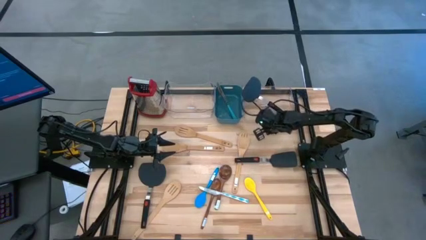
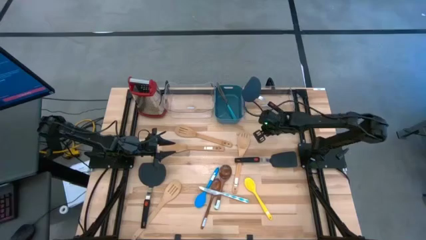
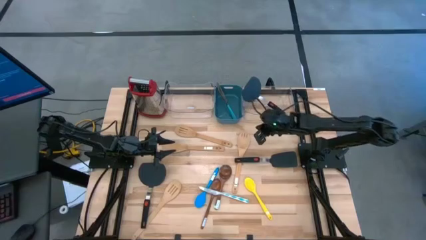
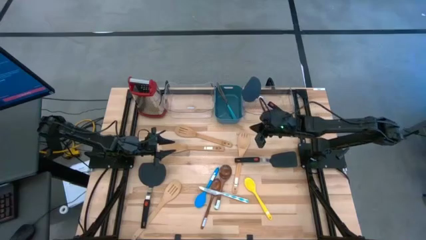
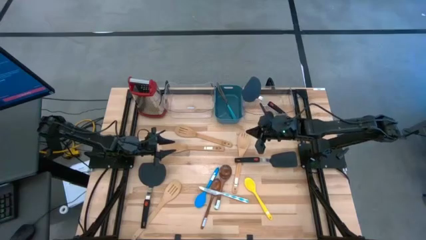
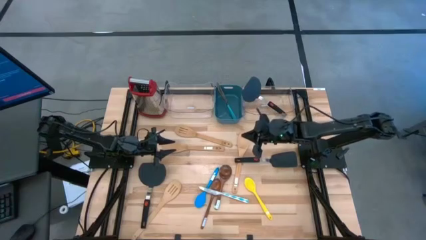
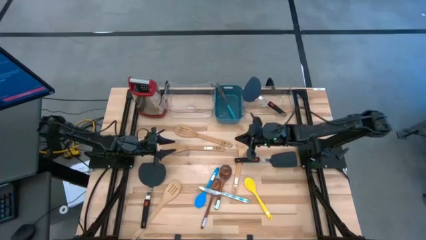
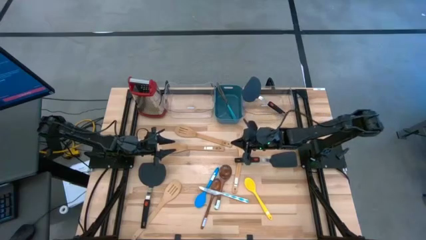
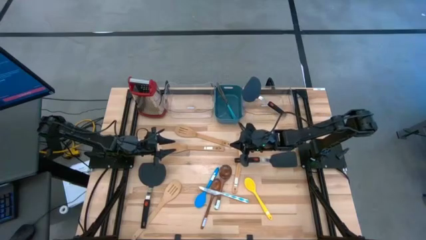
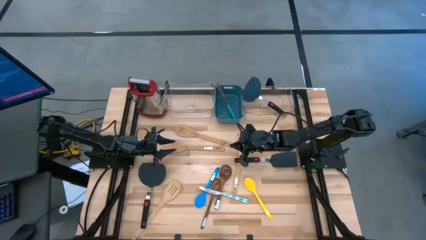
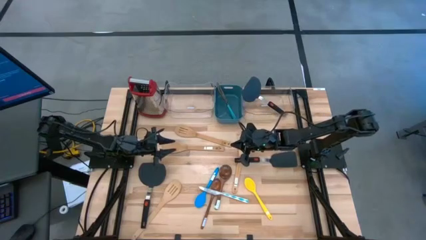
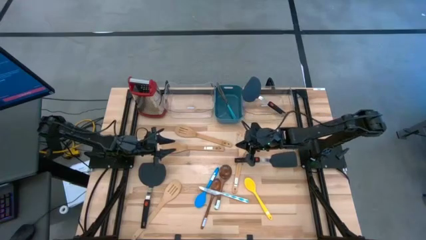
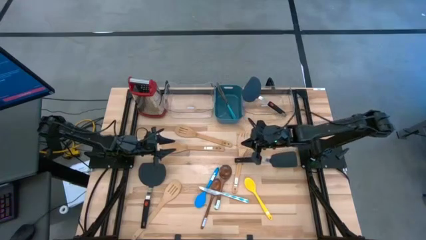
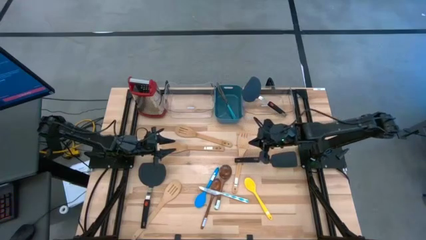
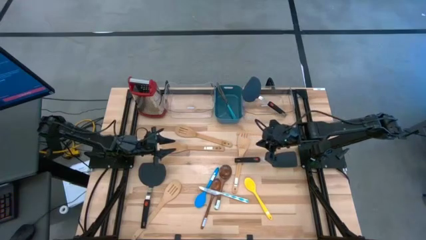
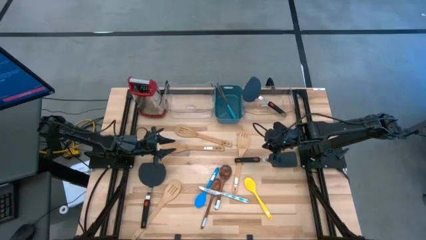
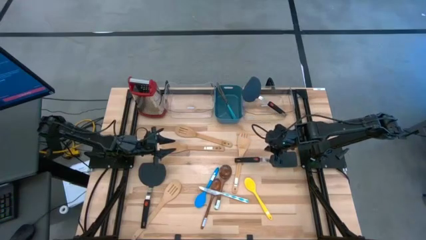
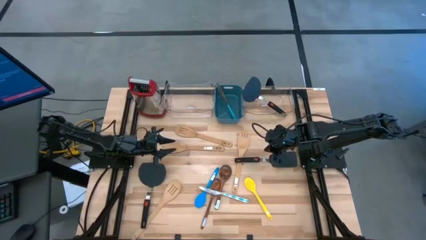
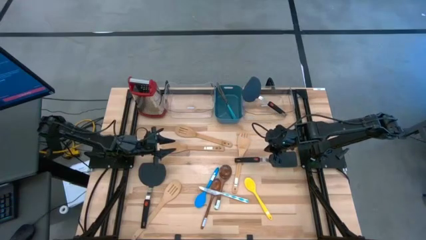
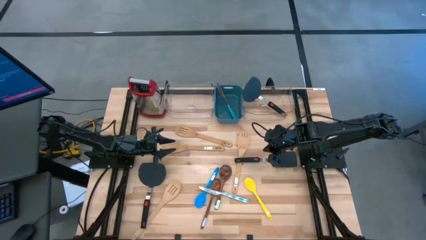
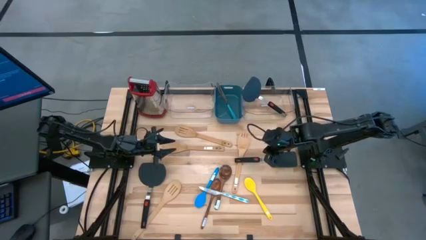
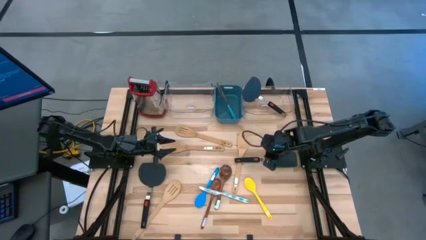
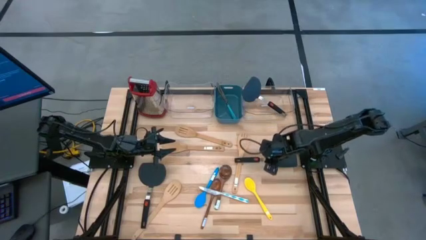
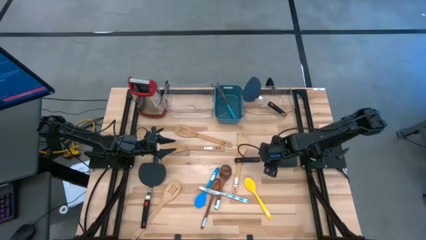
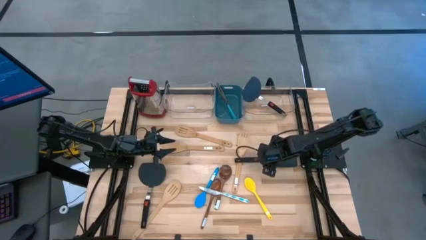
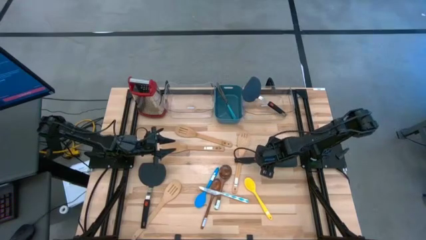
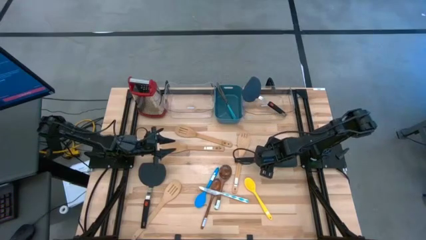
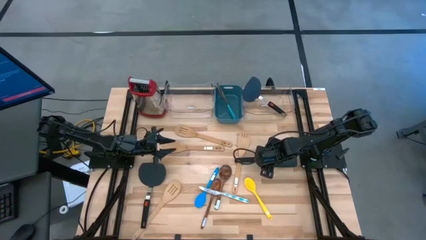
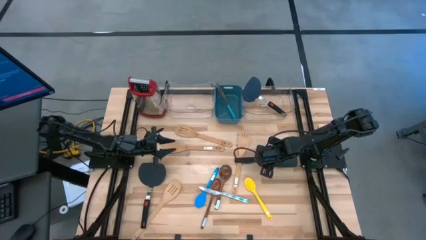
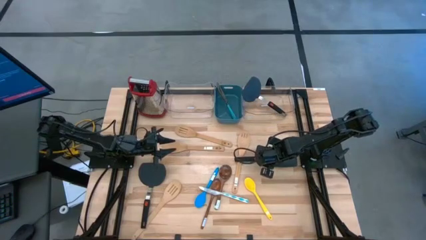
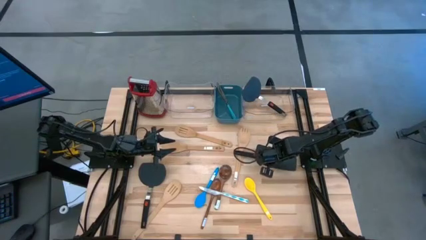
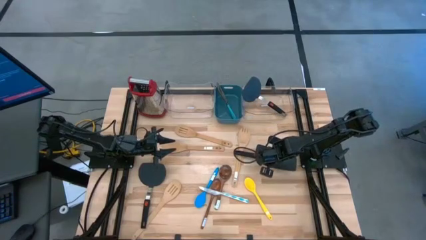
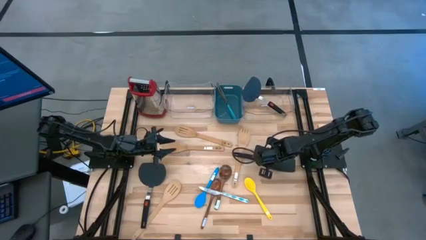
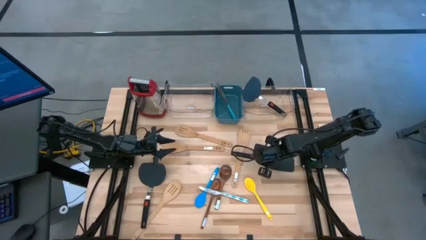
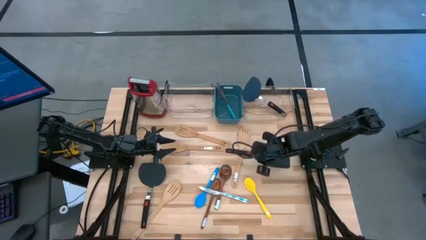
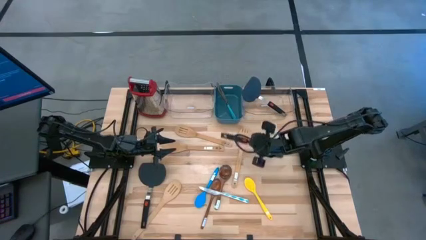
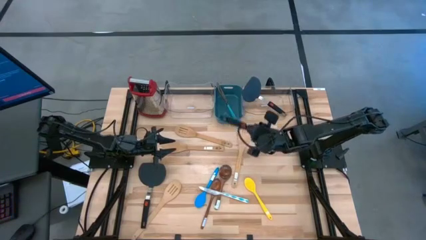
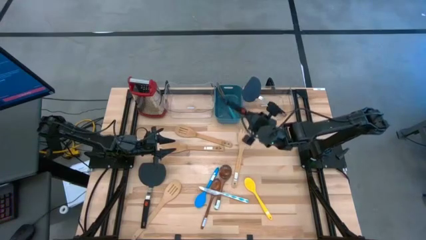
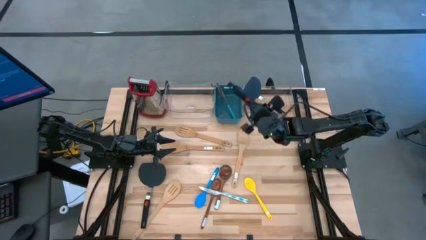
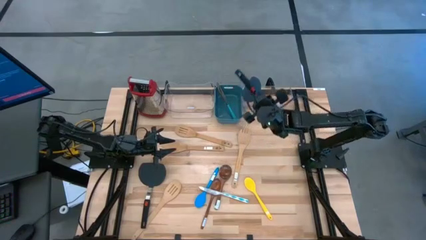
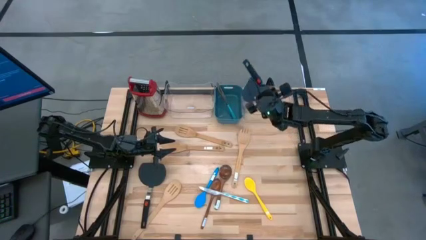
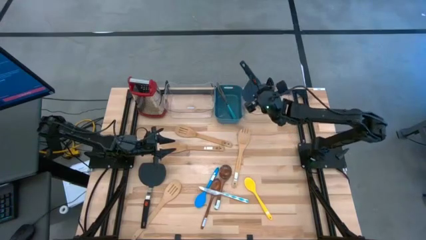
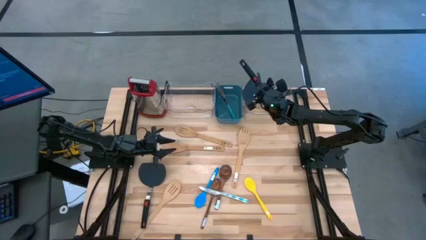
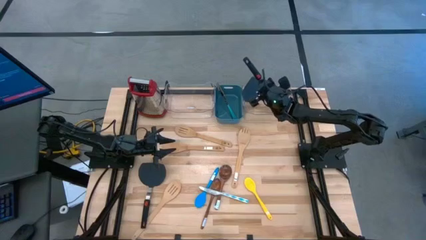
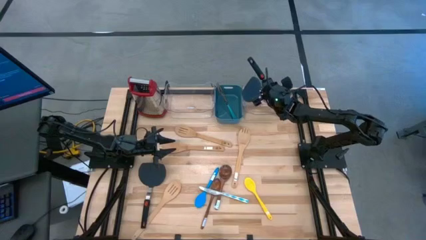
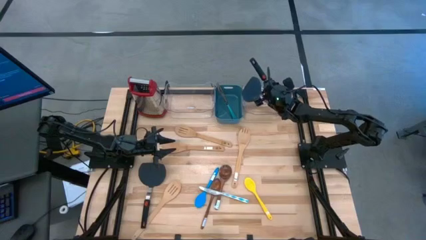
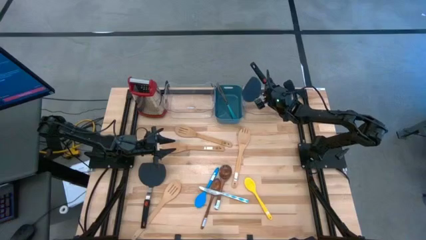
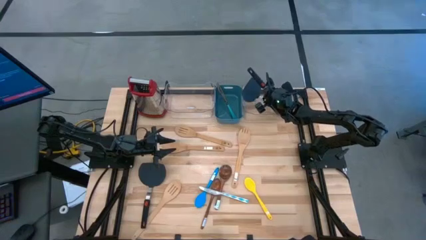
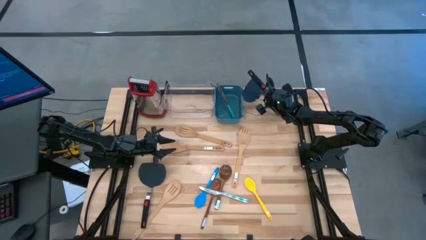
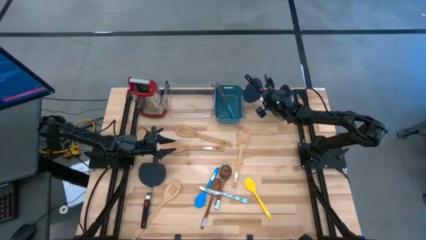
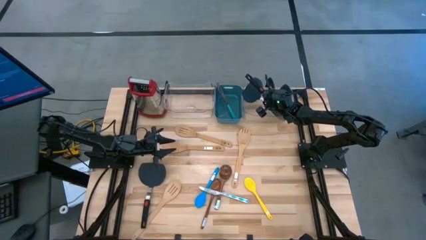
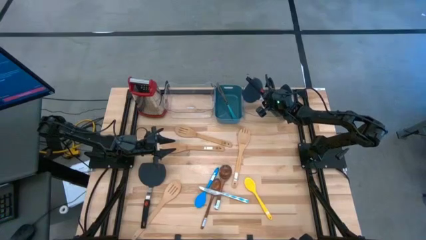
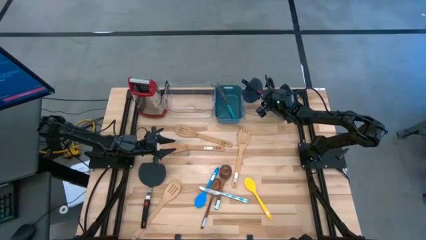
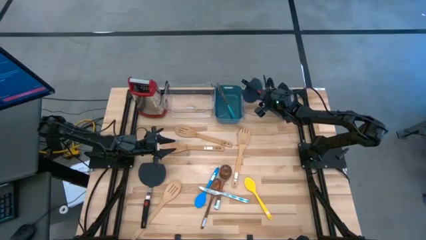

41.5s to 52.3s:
Task: Pick & Place Kitchen Items
Put the black spatula into the right transparent bin

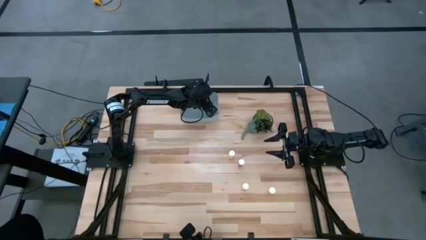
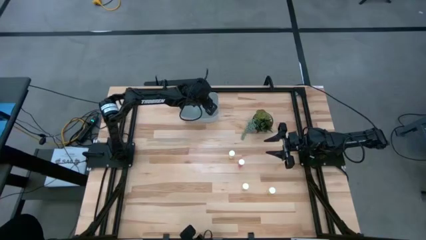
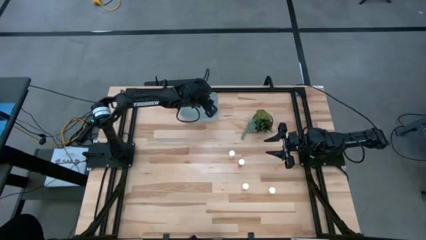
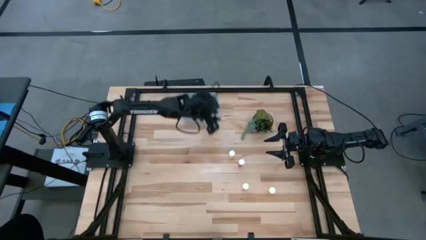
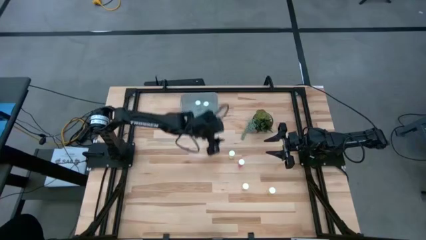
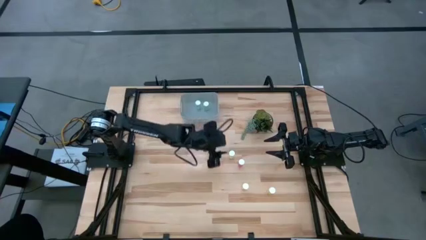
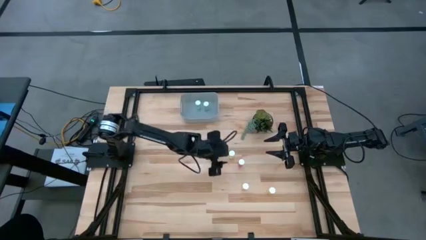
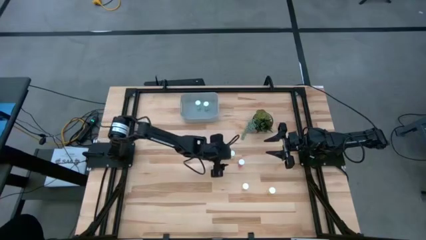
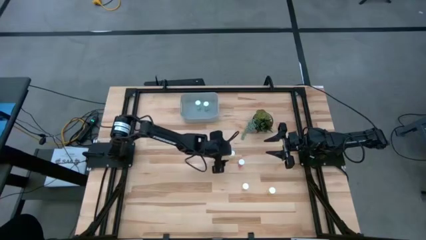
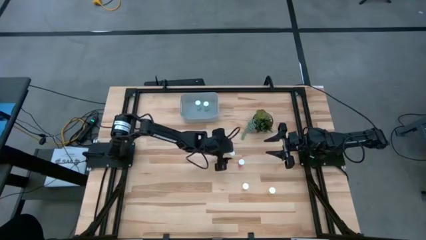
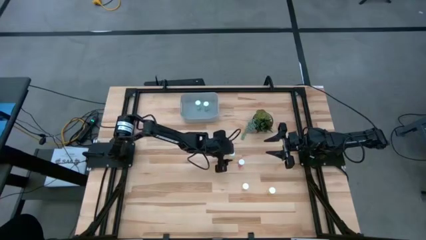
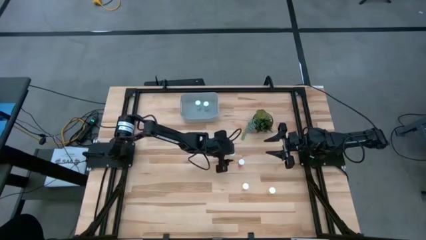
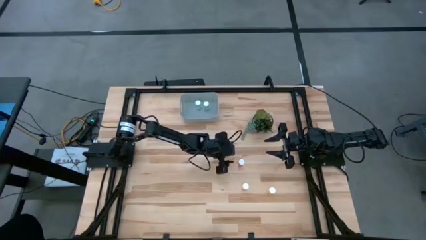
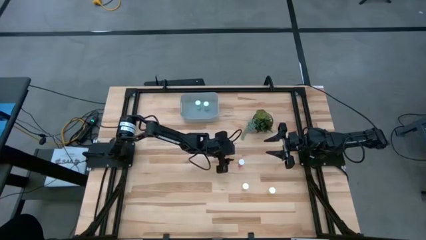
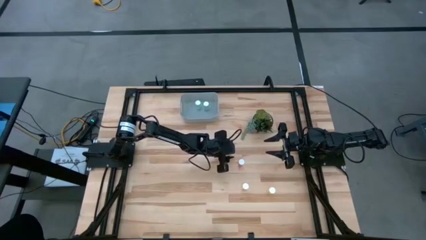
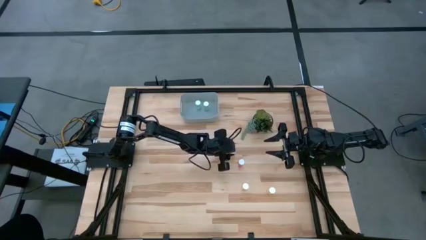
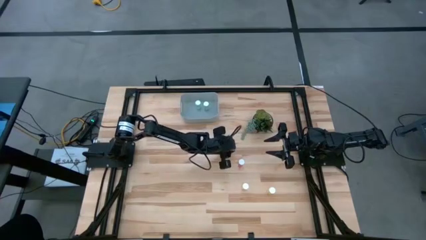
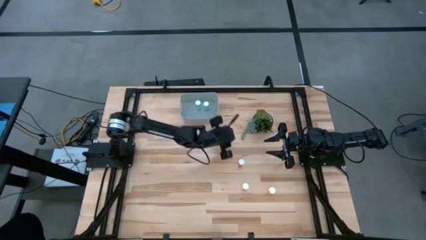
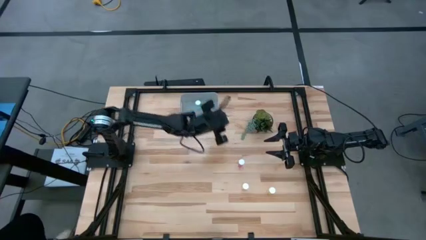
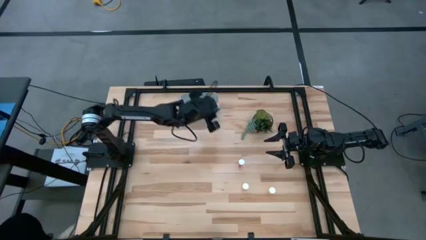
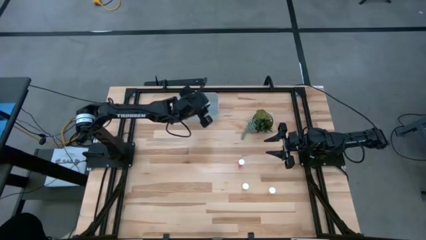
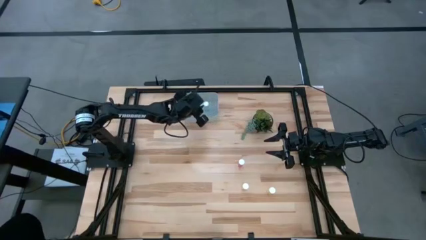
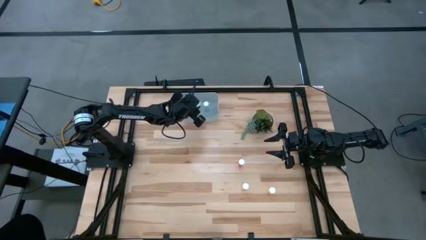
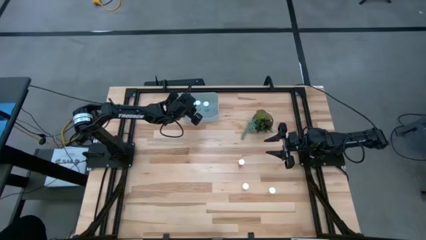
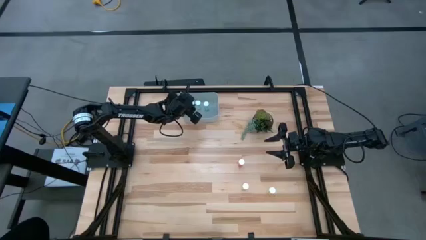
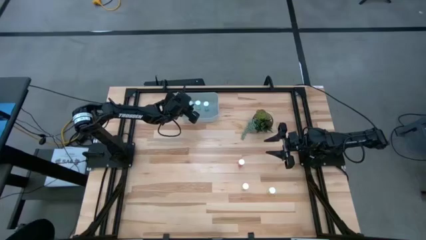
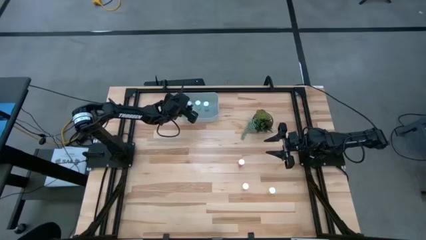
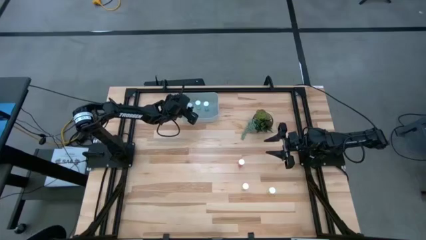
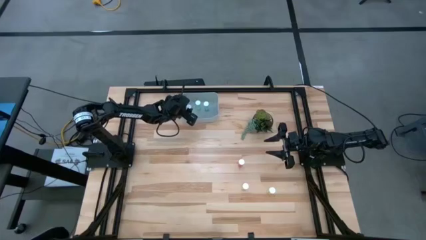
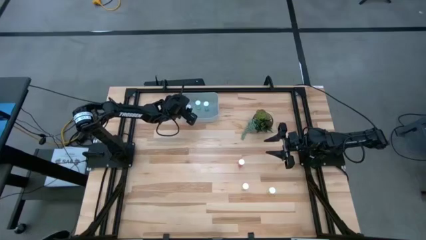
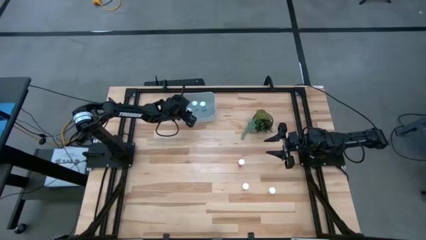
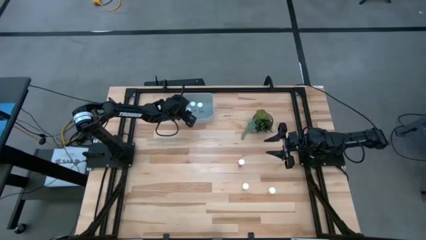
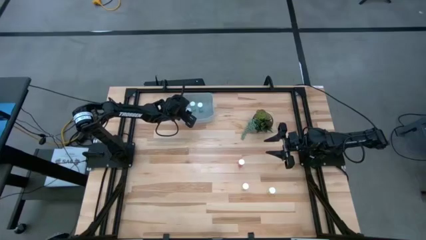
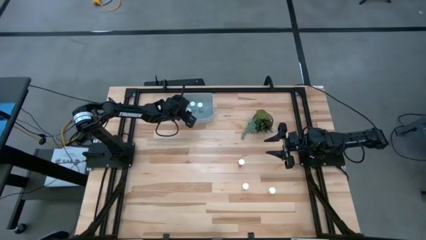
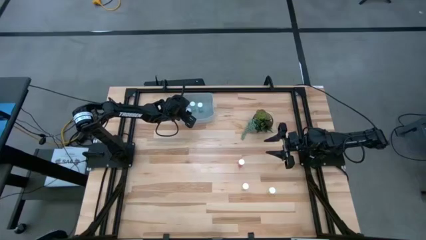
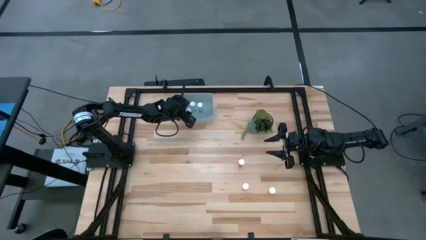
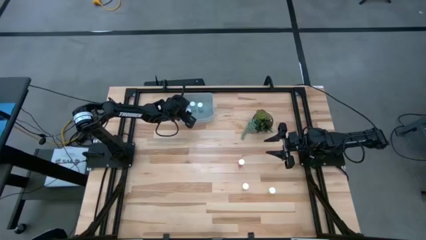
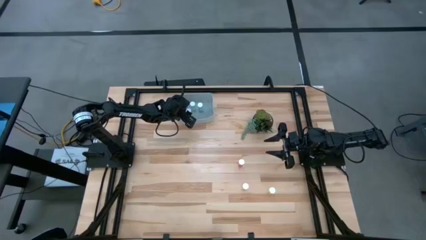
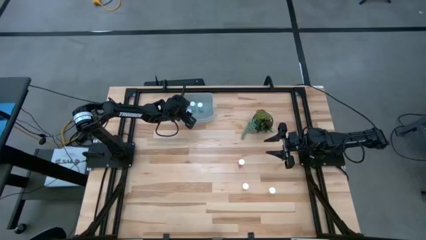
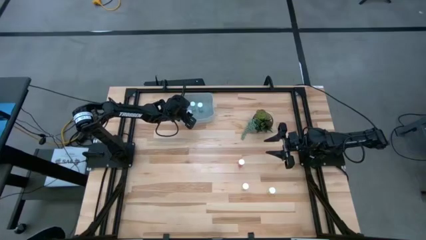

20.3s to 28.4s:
Task: Pick and place pill bottles into a basket
Put the top yellow pill bottle into the gray container
